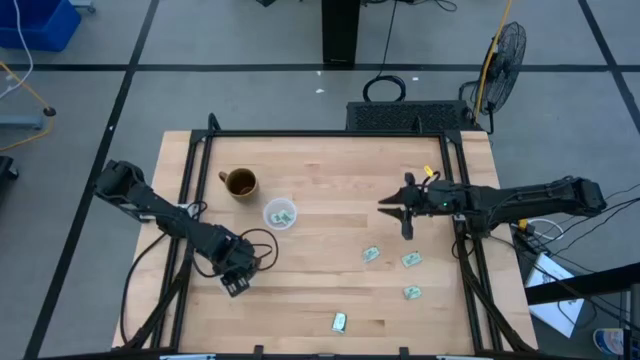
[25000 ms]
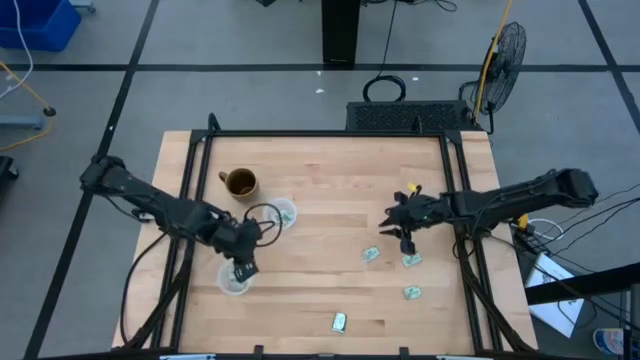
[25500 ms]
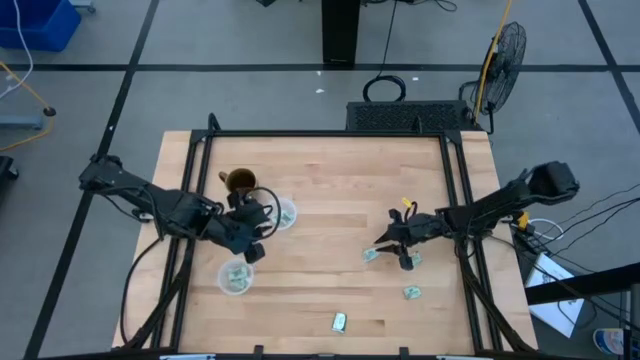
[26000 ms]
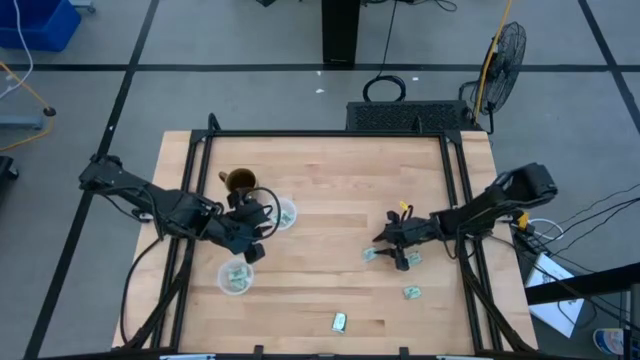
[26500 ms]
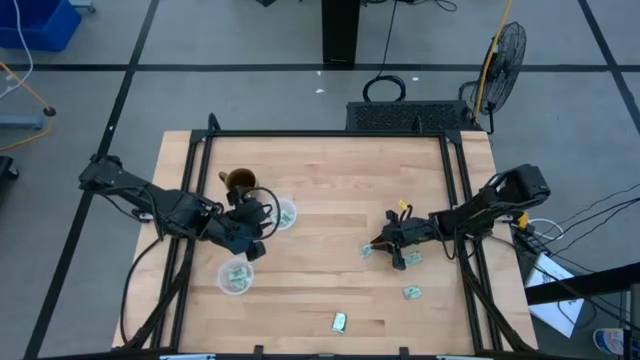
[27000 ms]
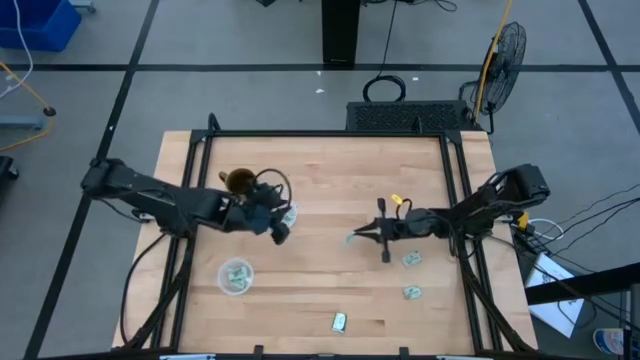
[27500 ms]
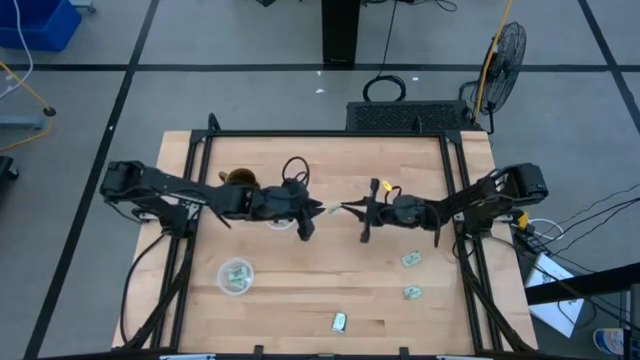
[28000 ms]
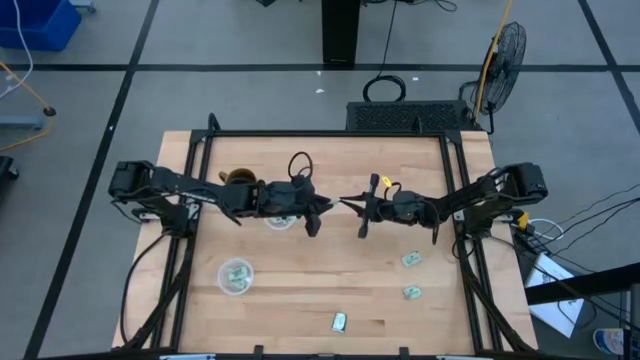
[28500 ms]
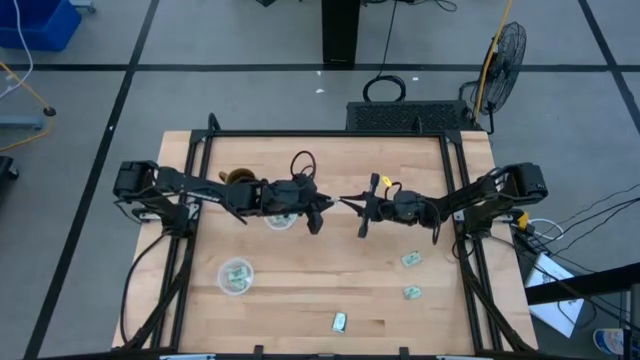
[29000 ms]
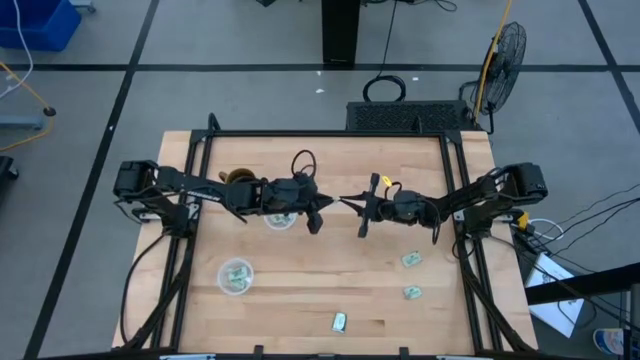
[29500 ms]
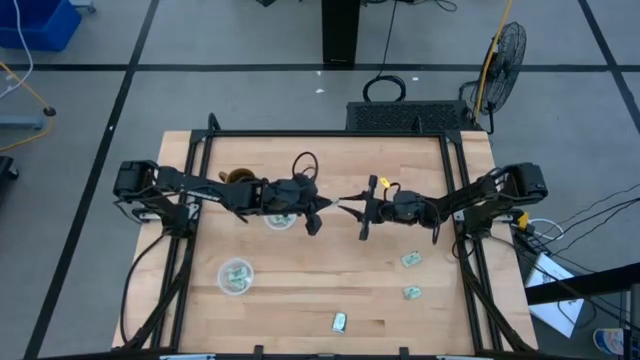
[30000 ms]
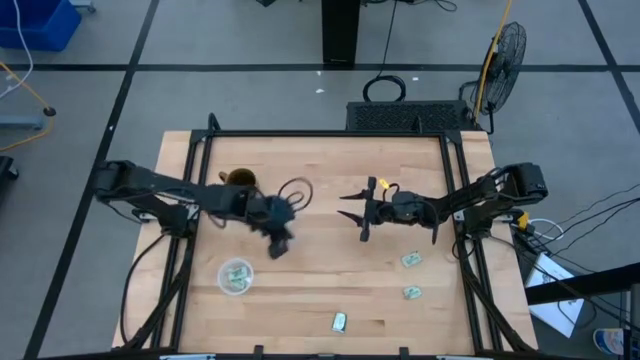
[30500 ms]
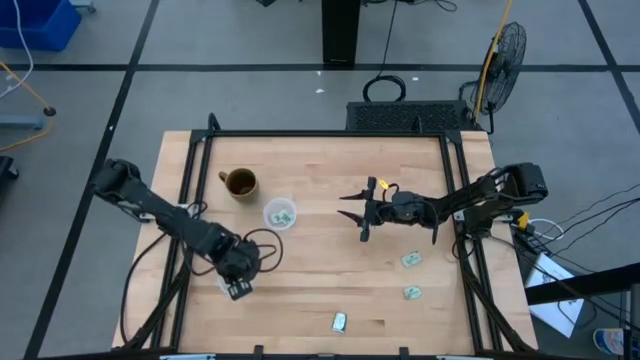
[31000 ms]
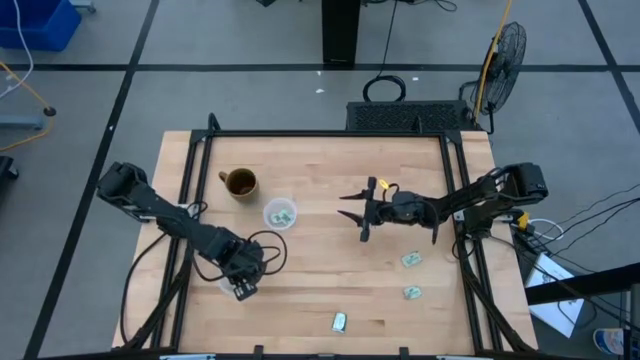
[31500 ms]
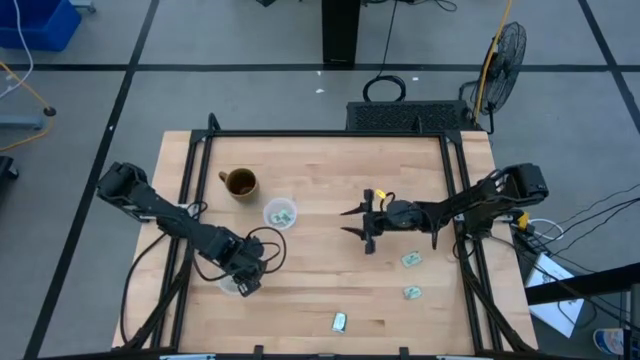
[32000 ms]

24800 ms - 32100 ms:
Task: Pick and place Stevia / Truvia into bins
Put the stevia packet into the bottom transparent container

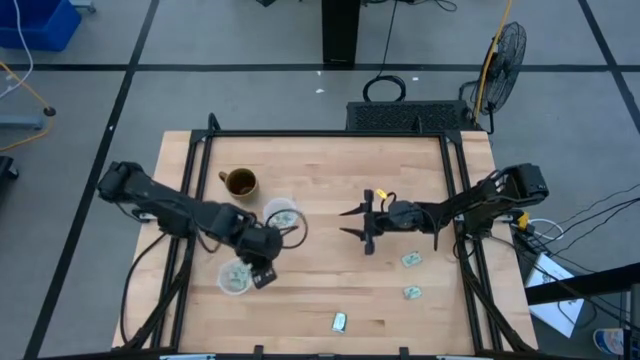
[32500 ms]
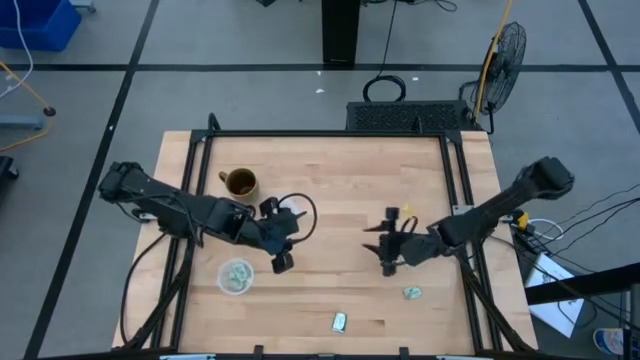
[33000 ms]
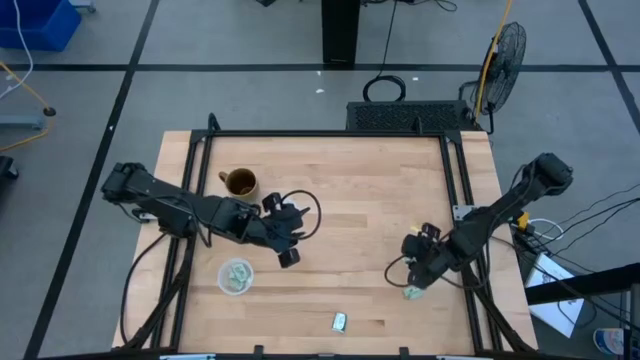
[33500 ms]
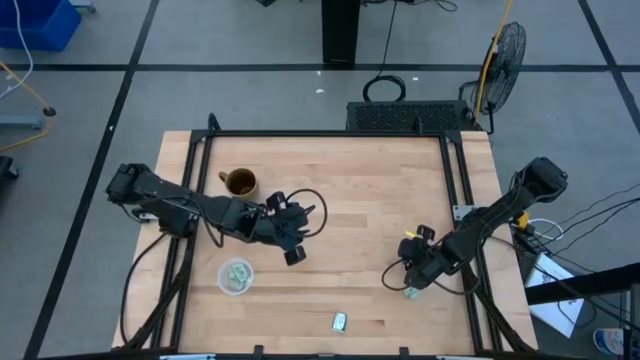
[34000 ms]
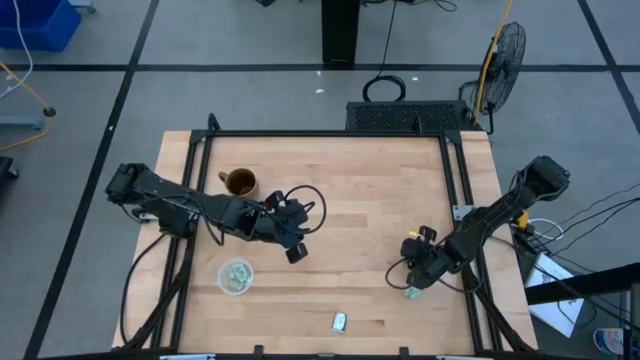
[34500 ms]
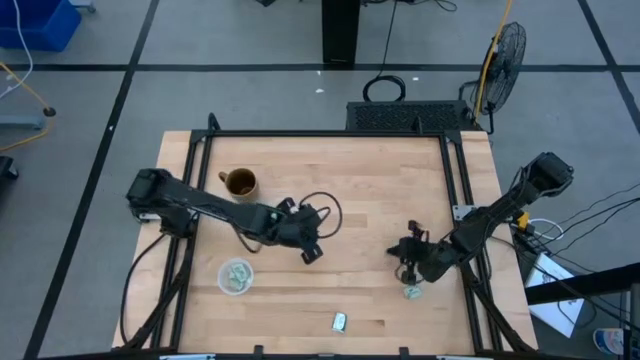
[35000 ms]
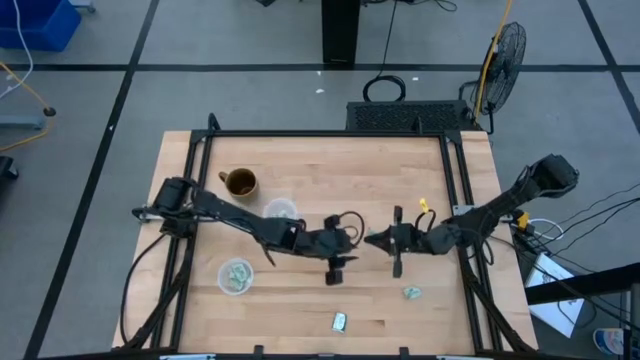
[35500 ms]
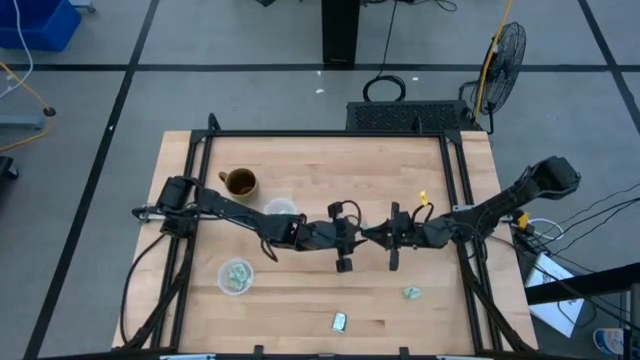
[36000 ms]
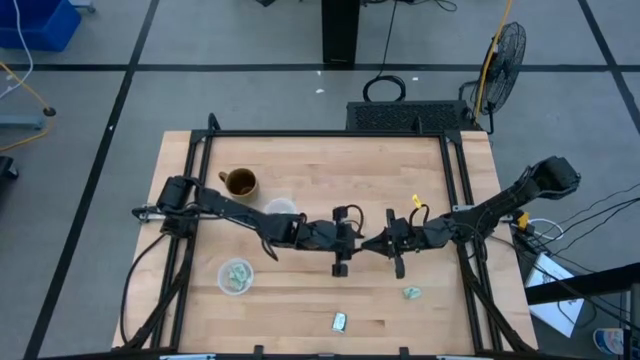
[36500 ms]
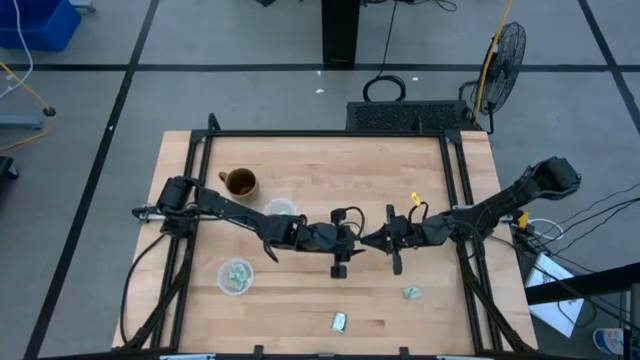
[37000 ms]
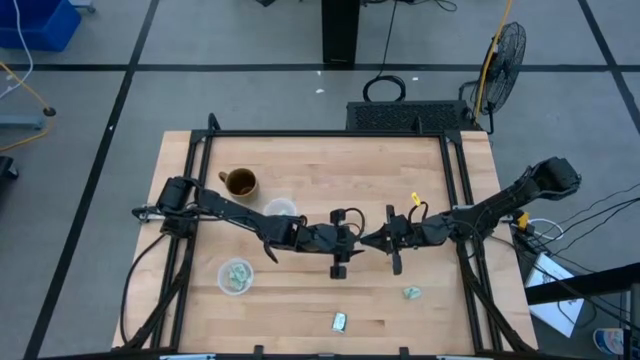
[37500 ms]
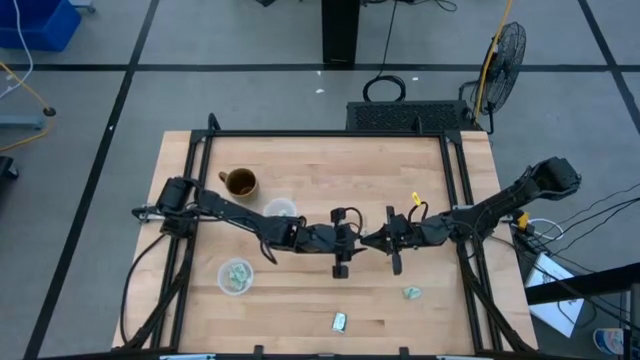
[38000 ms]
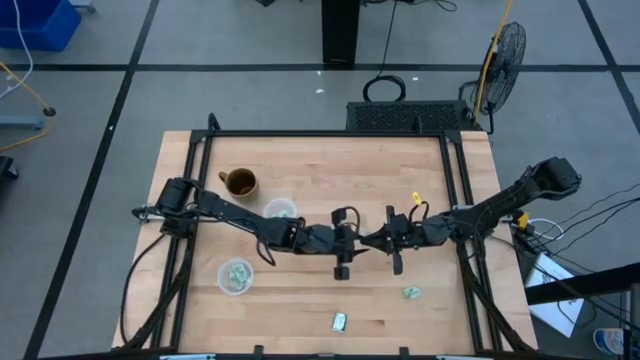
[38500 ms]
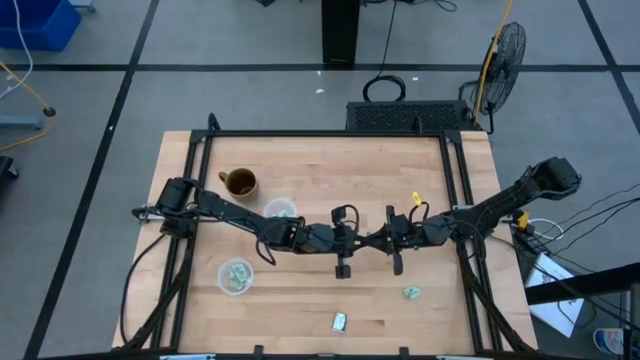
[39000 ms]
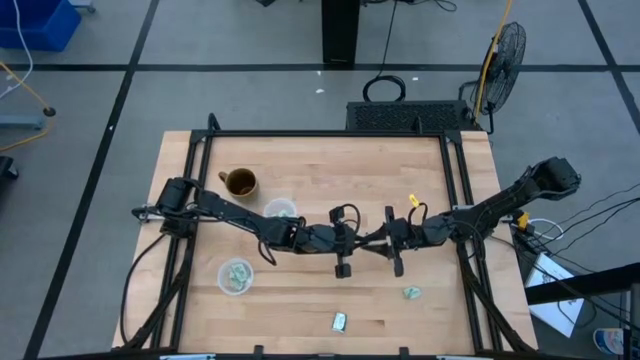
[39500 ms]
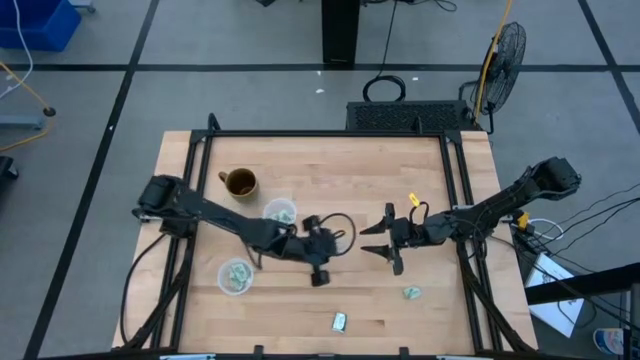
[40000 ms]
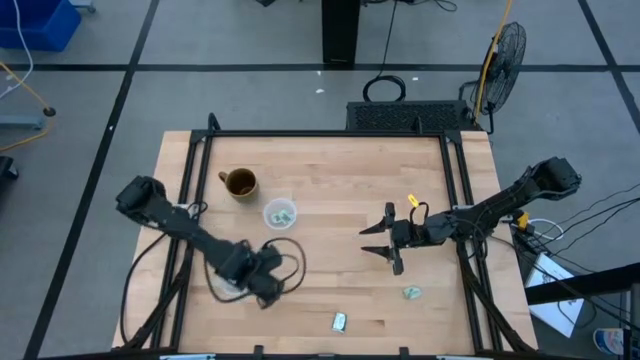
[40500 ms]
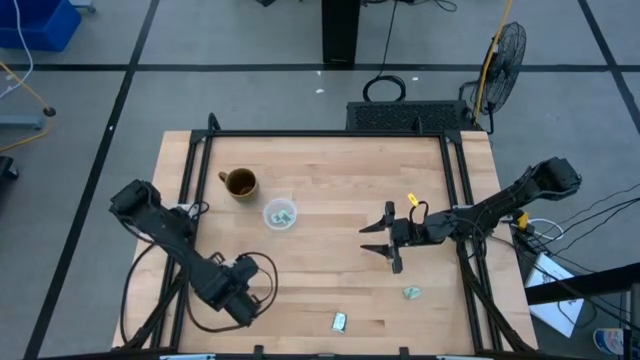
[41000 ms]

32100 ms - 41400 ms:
Put the stevia packet into the bottom transparent container

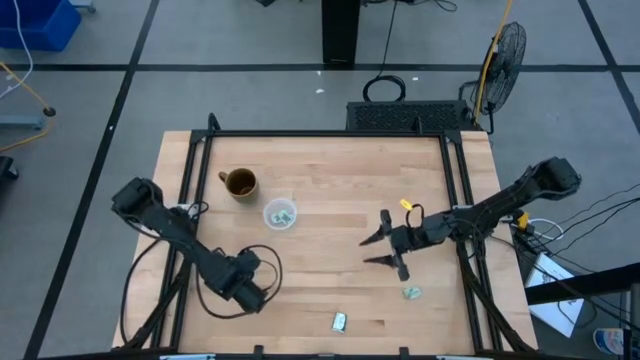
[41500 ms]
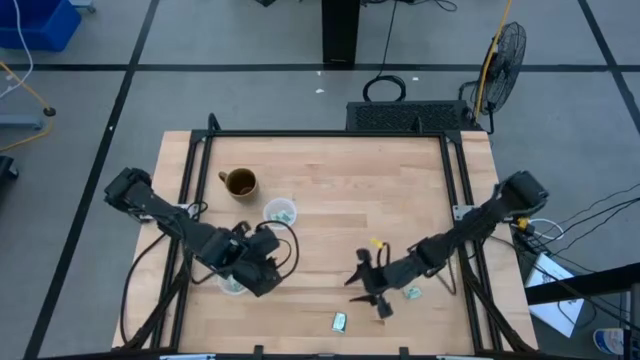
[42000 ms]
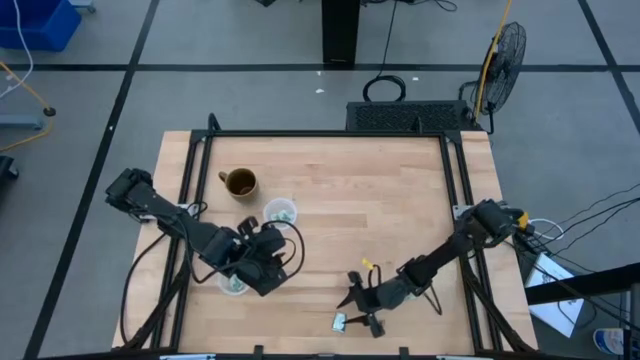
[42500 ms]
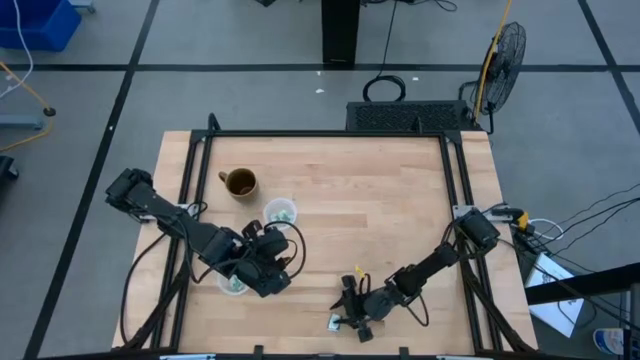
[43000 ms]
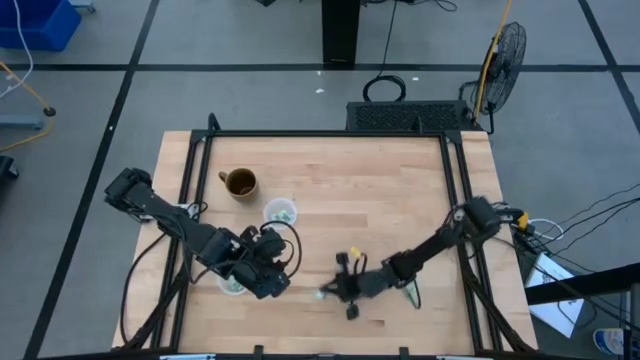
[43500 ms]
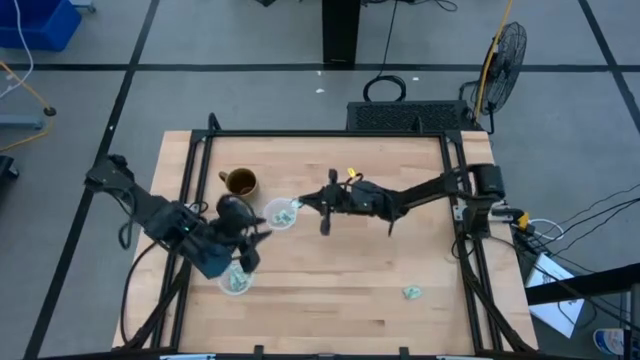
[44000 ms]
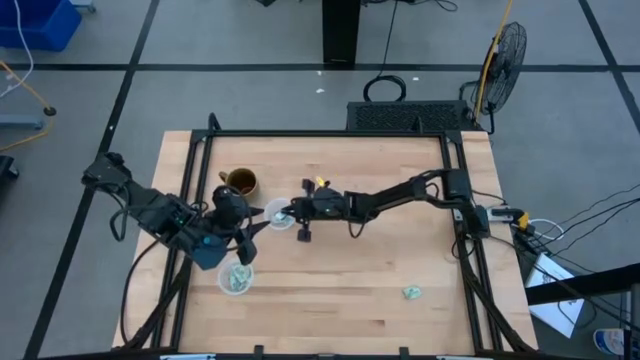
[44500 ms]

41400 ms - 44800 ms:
Put the truvia packet into the top transparent container

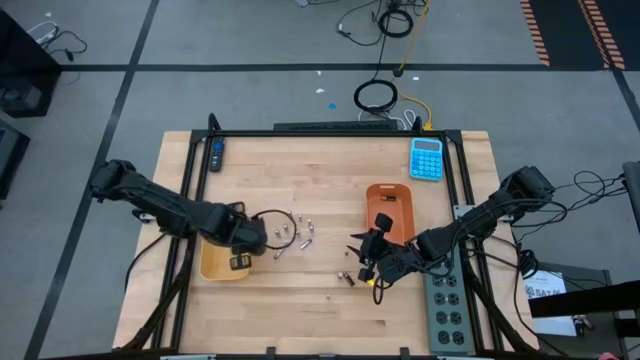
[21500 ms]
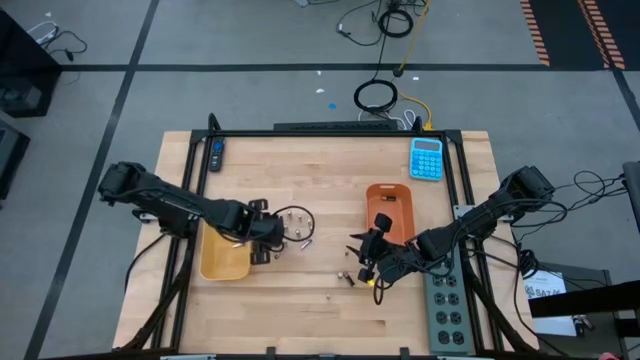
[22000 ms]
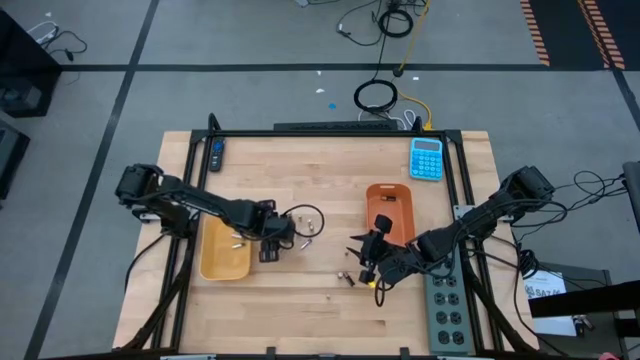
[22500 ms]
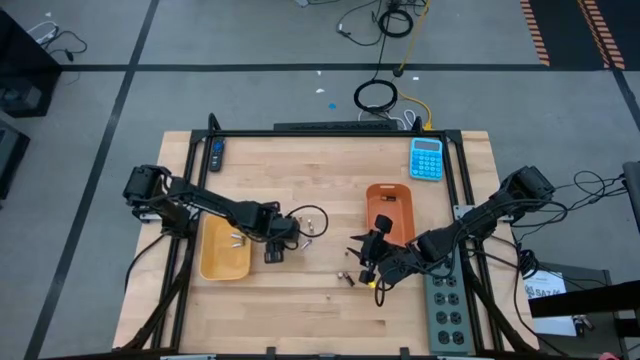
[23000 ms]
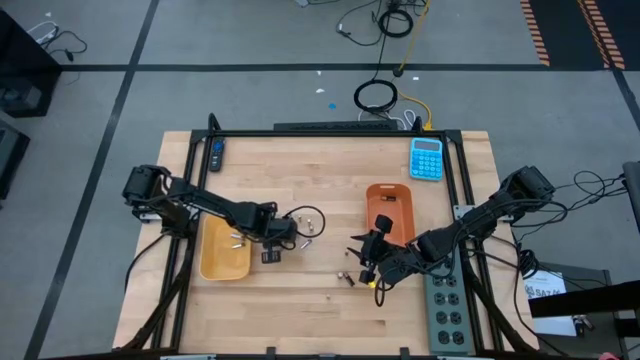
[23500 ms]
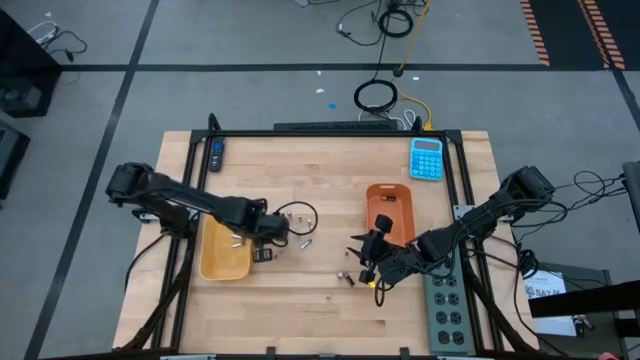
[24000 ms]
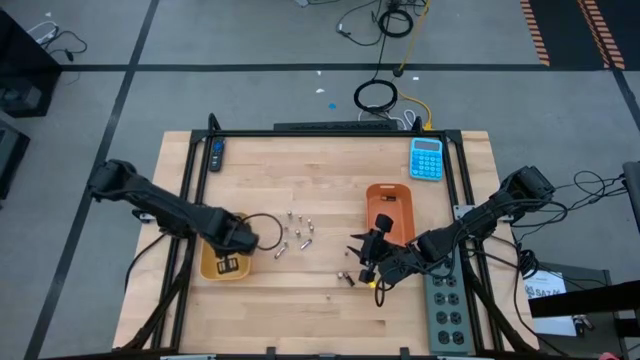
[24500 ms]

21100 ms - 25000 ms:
Task: Sort batteries
Put the silver battery into the yellow bin
